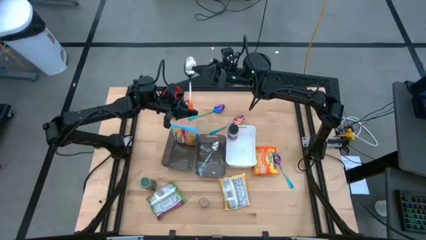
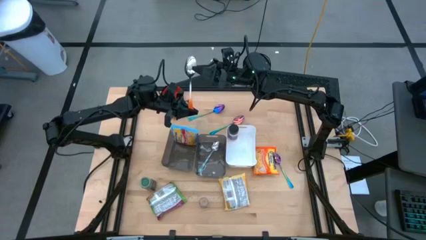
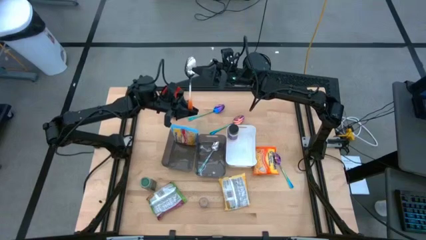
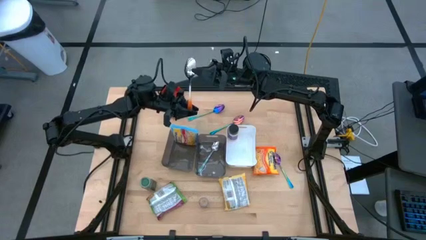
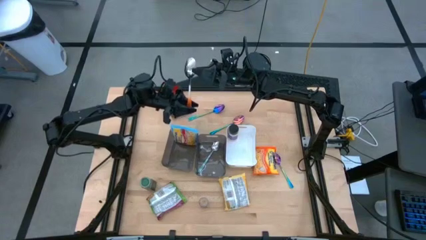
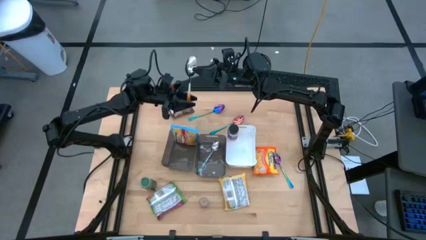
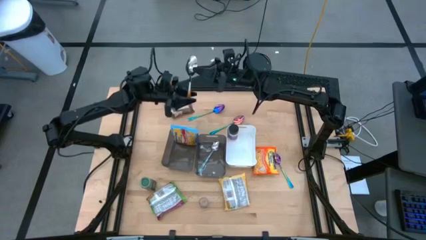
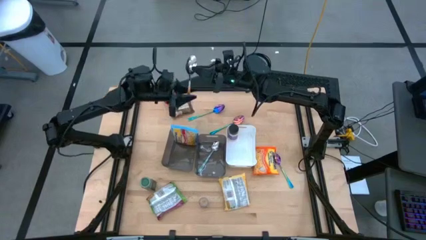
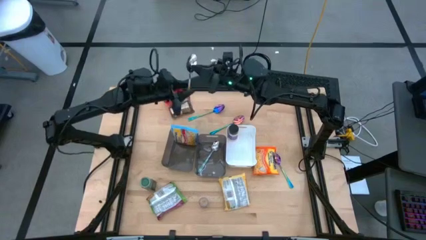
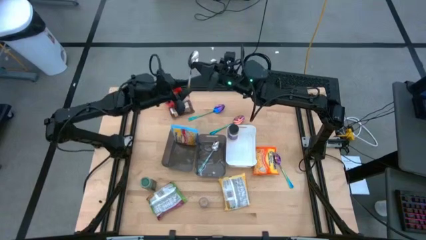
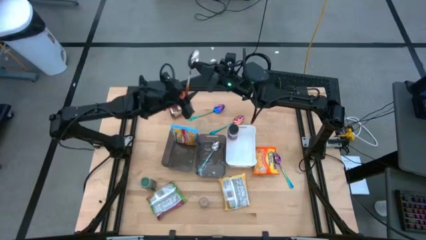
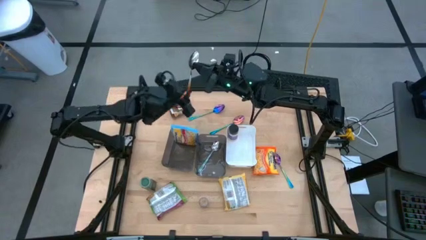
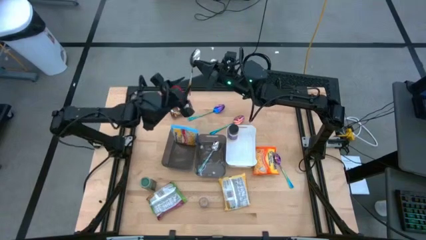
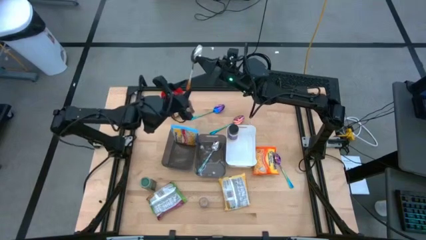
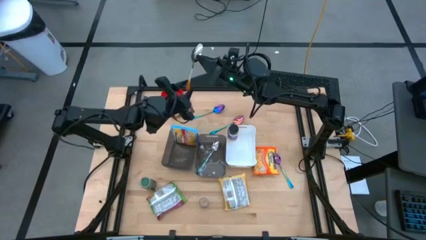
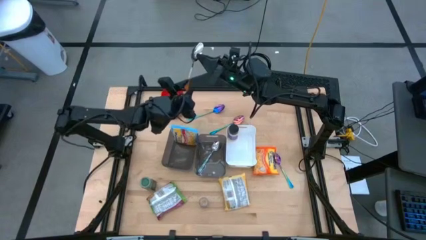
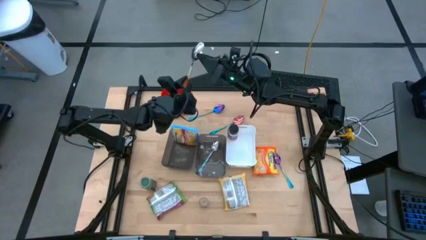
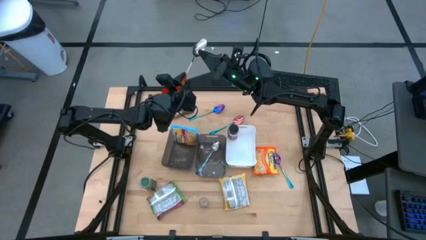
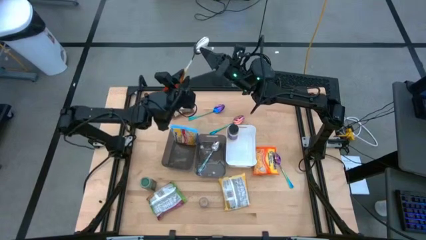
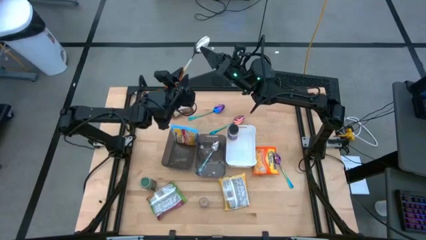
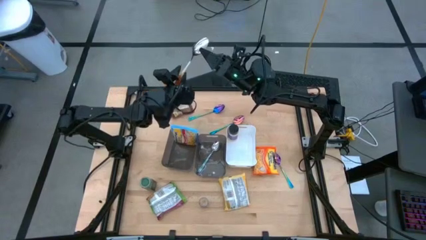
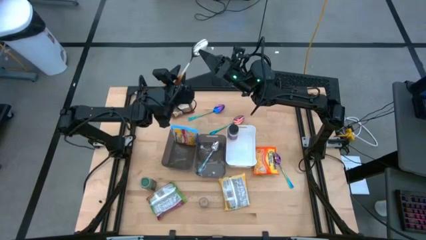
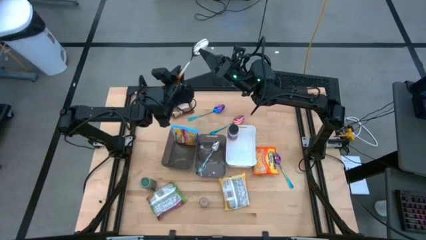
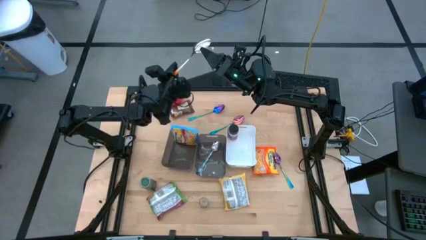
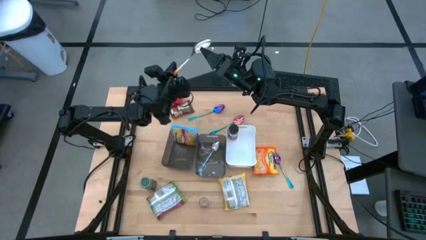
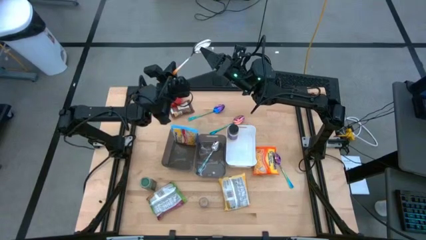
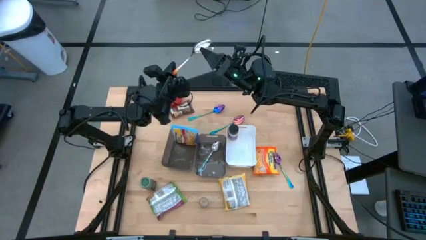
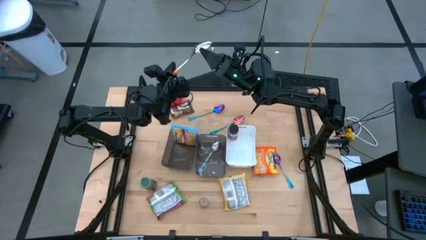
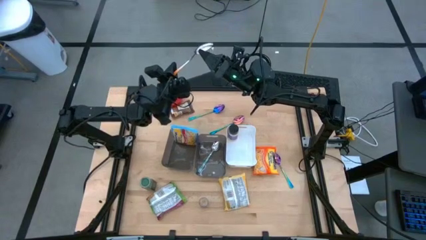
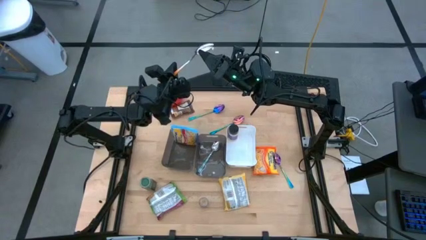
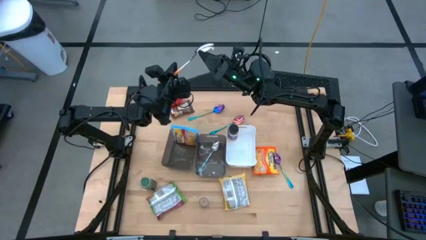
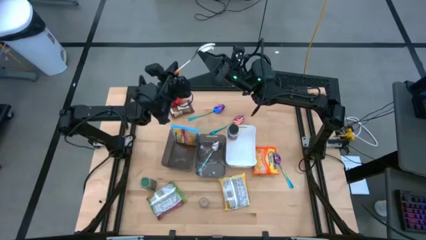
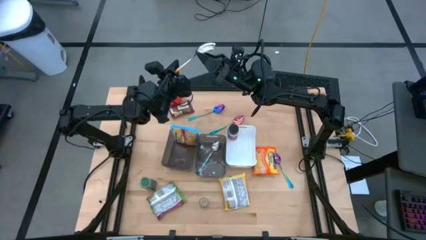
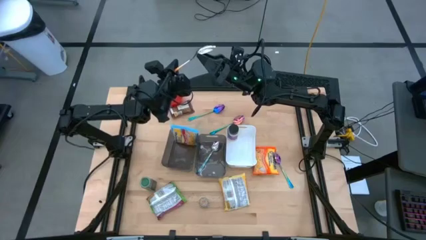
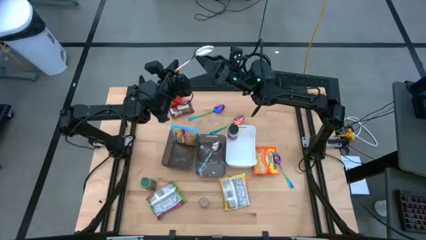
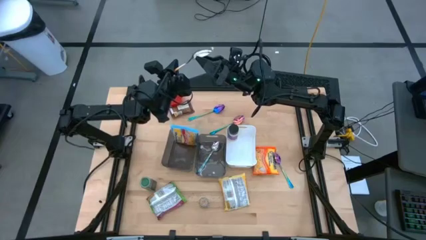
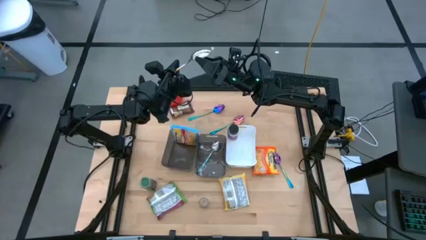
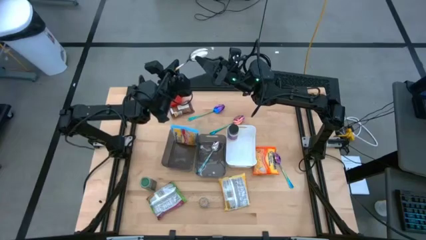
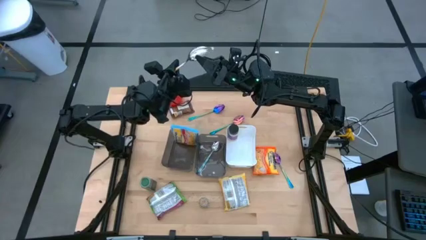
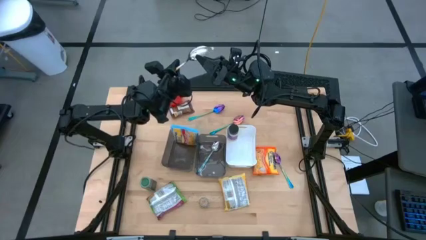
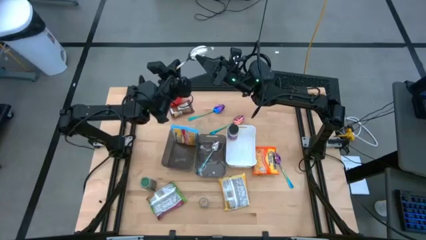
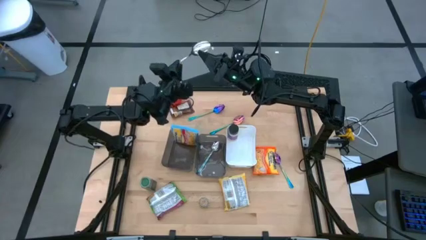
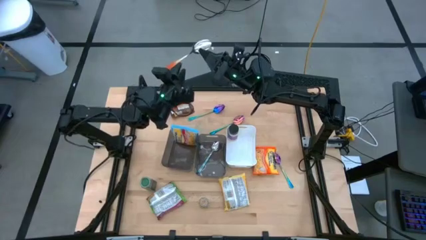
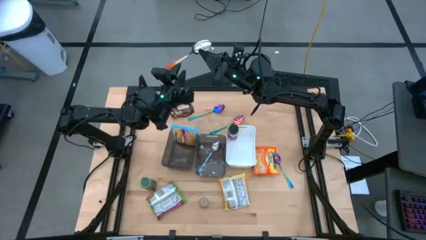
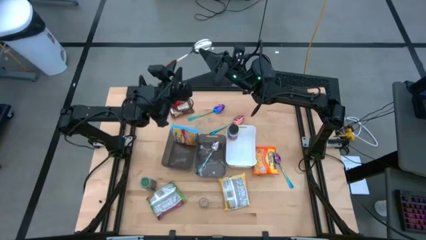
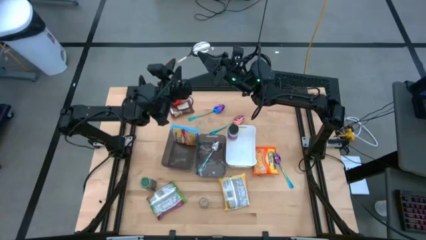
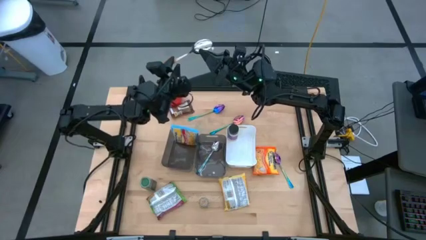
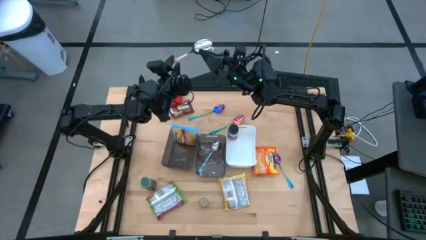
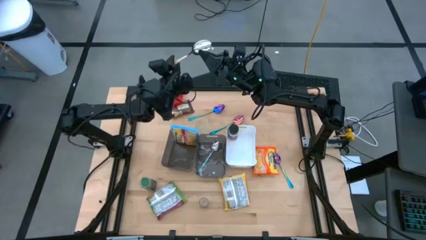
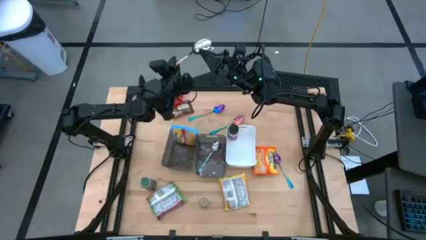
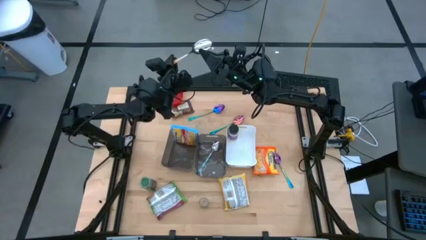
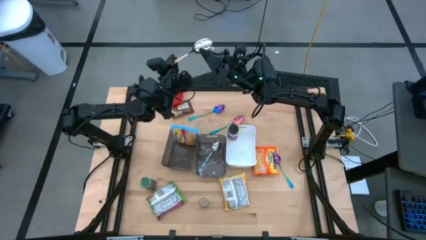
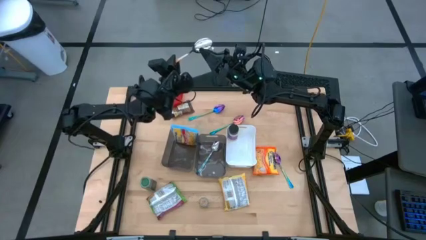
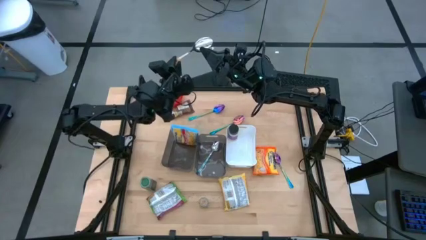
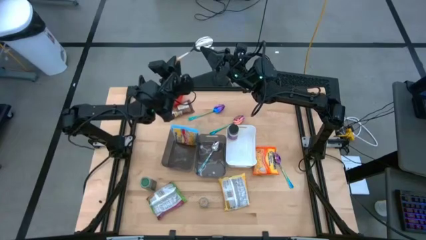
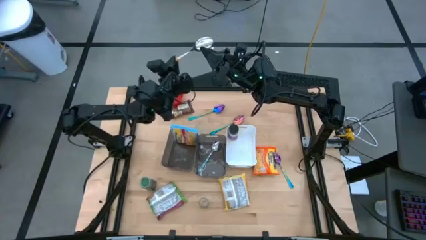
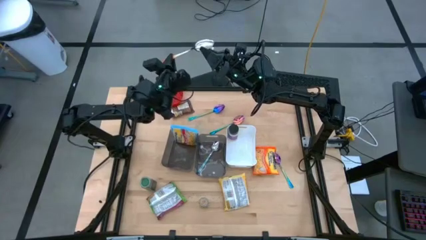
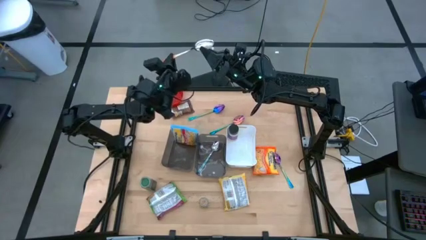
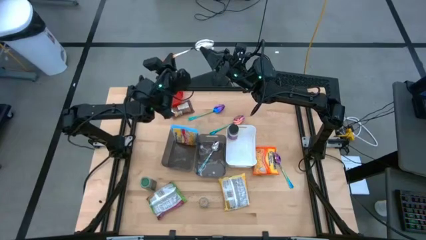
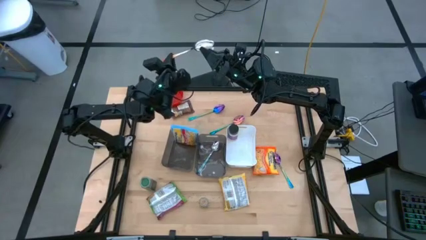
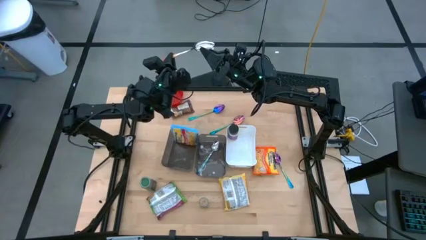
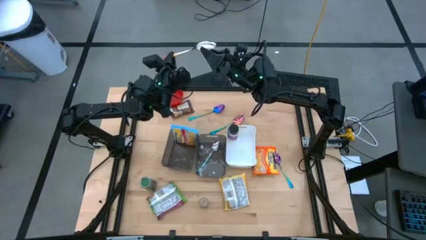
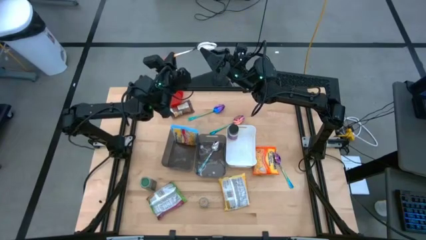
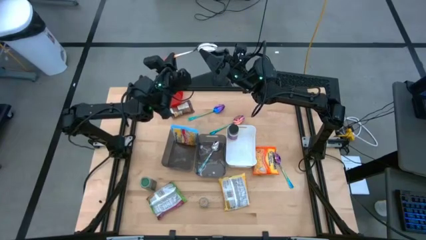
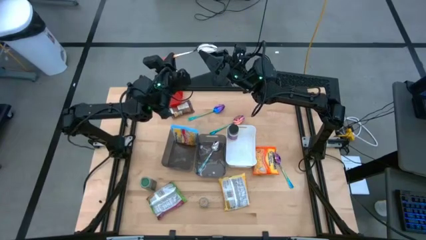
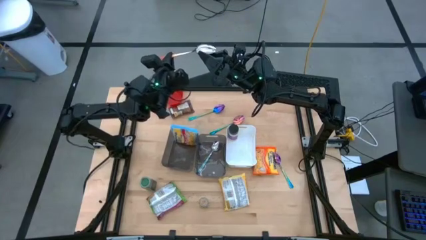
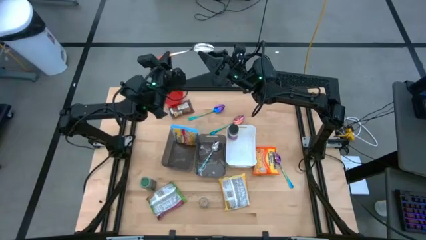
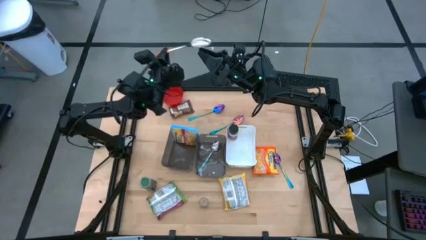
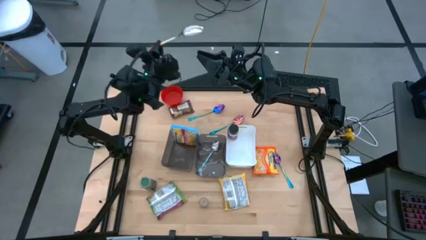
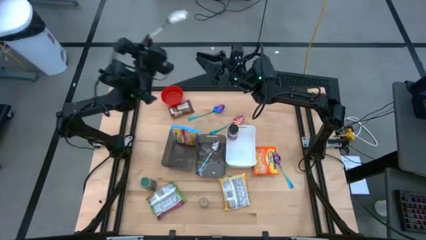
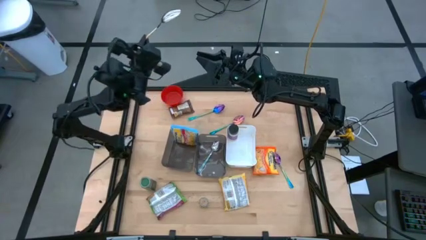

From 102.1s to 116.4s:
Task: Pick & Place Food Item
Put the orange spoon into the right gray bin

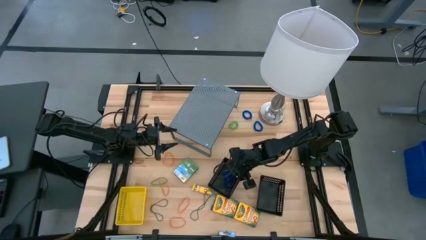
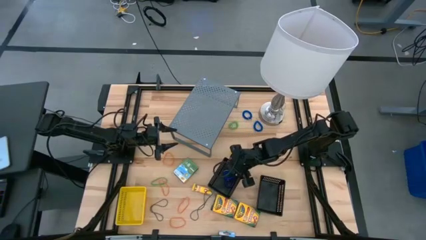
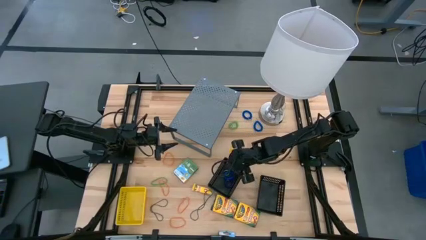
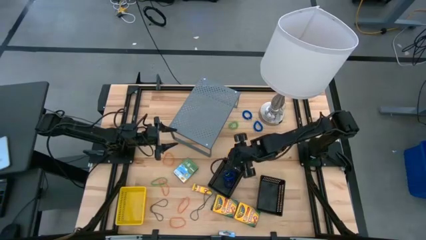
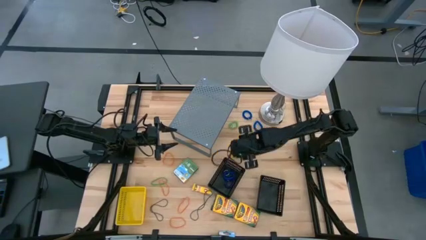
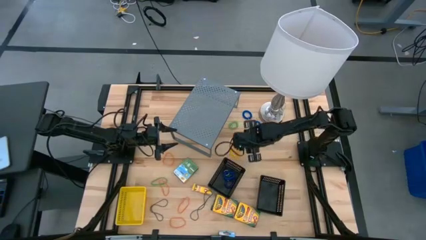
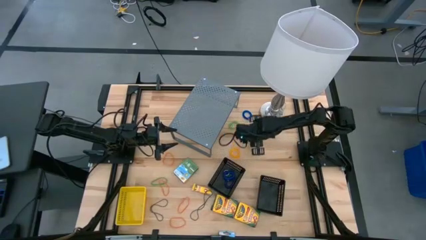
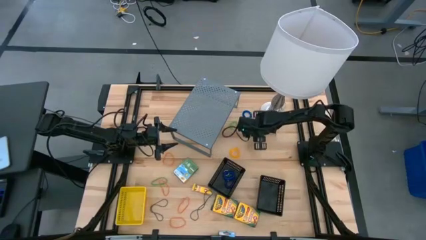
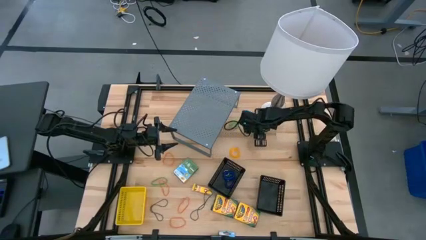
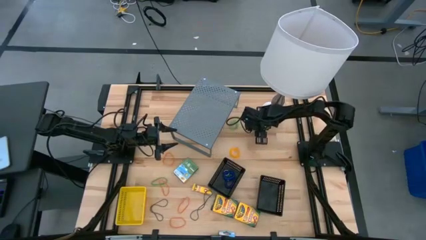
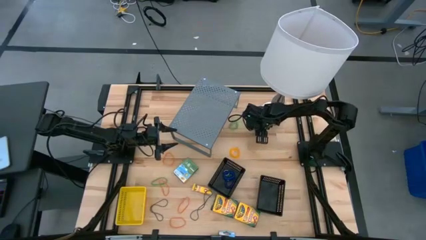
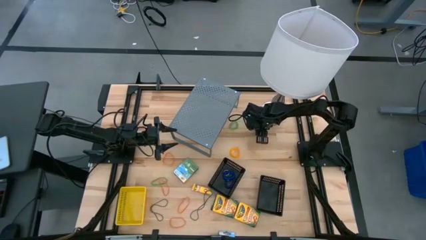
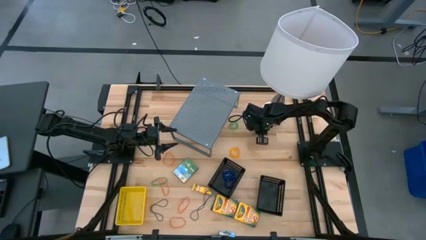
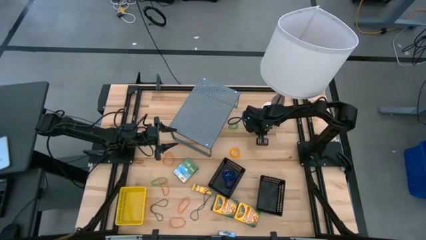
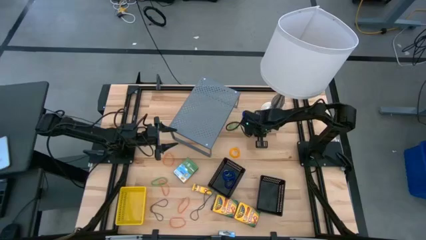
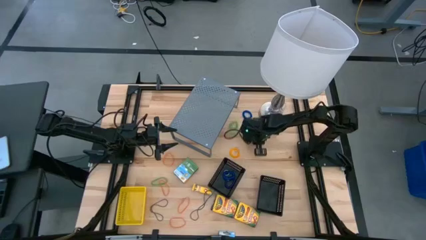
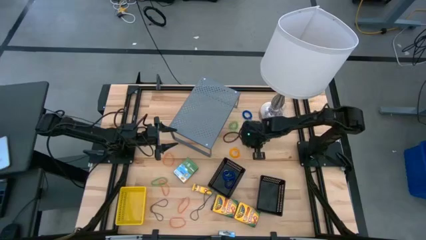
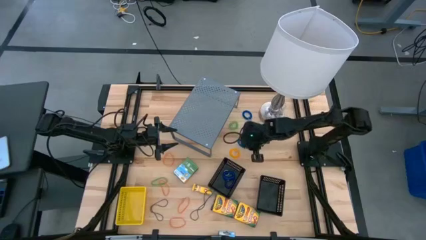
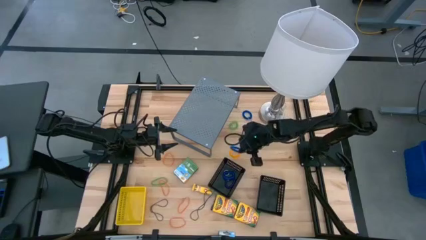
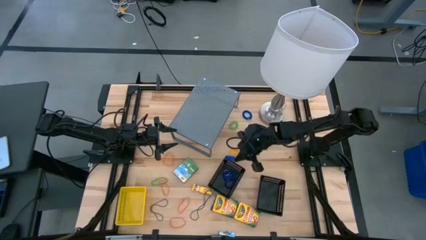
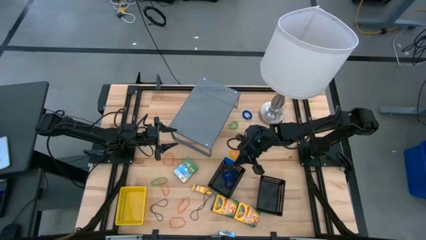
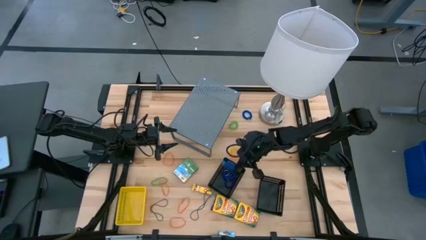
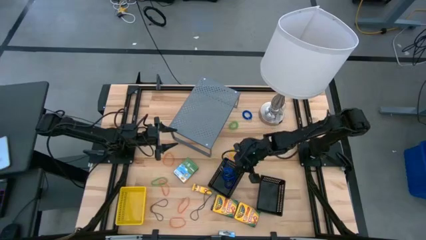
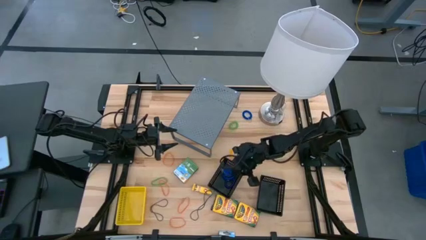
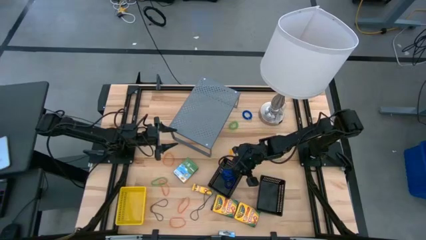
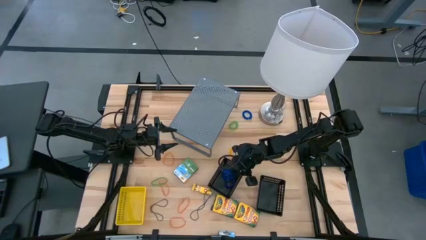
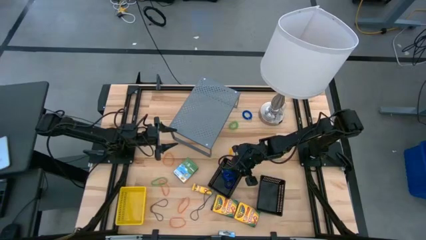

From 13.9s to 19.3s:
Task: Pick & Place Office Desk Supplies
Put the bottom blue spring keychain into the left black bin
